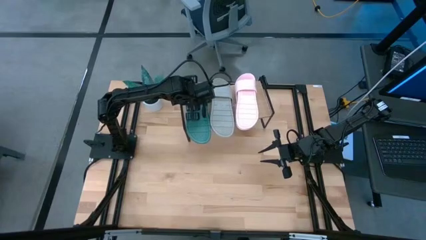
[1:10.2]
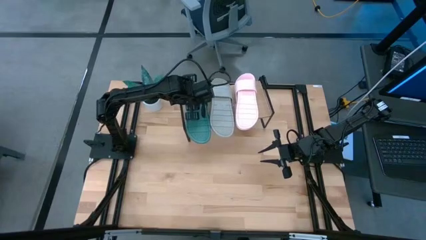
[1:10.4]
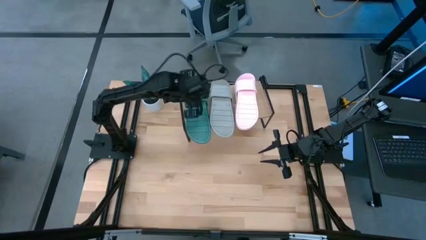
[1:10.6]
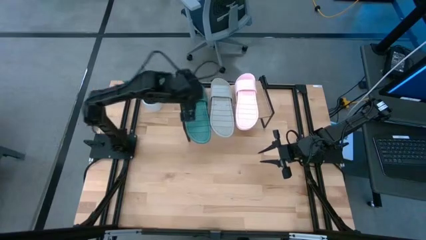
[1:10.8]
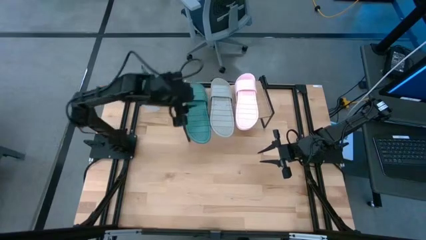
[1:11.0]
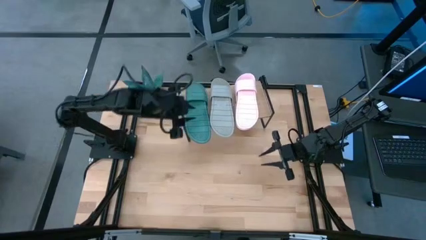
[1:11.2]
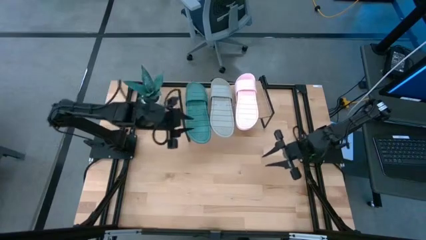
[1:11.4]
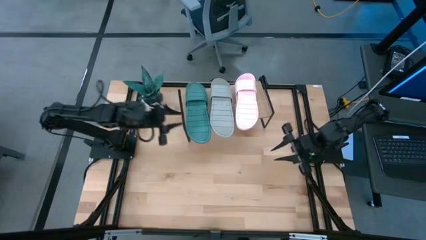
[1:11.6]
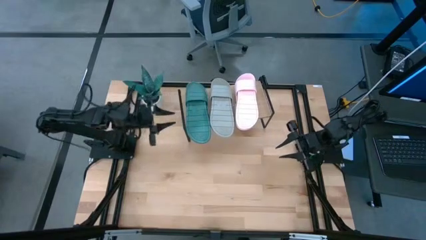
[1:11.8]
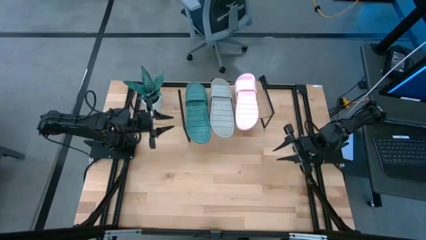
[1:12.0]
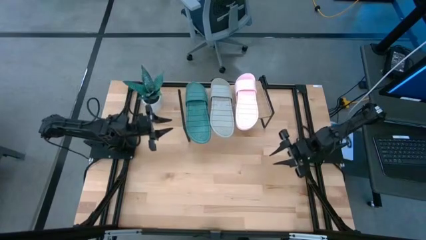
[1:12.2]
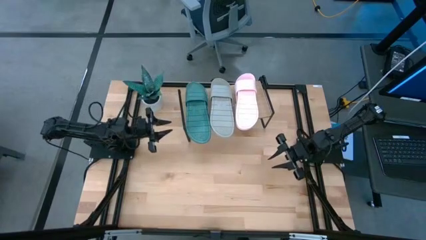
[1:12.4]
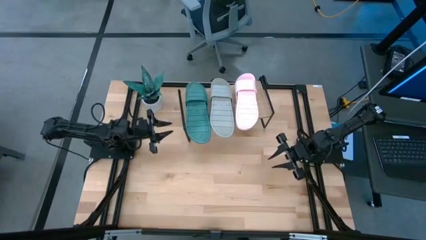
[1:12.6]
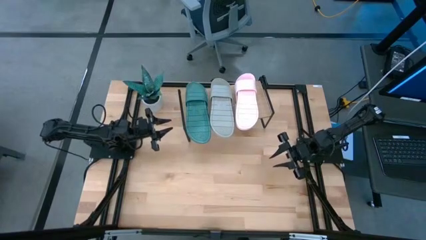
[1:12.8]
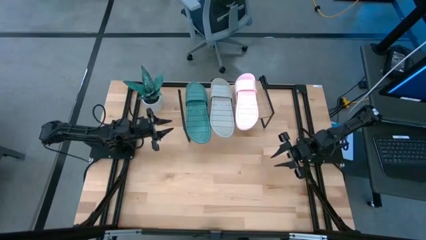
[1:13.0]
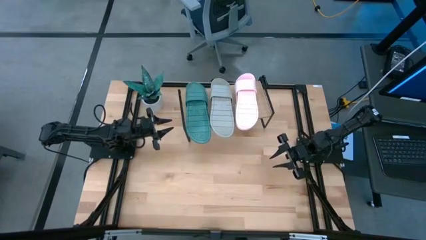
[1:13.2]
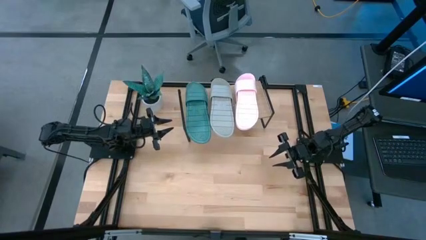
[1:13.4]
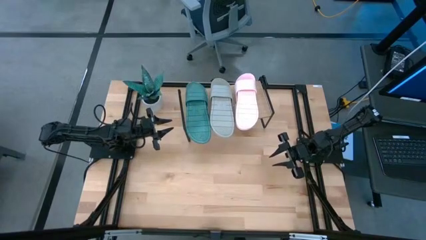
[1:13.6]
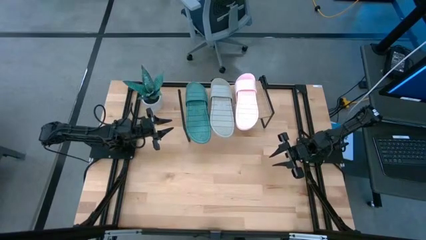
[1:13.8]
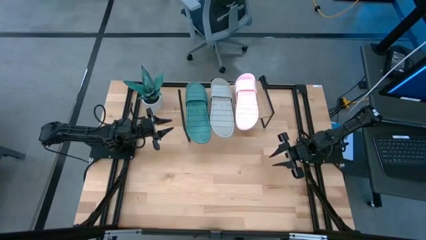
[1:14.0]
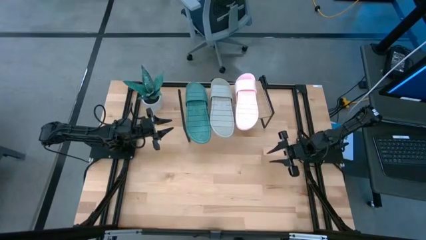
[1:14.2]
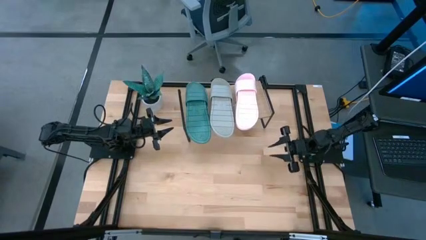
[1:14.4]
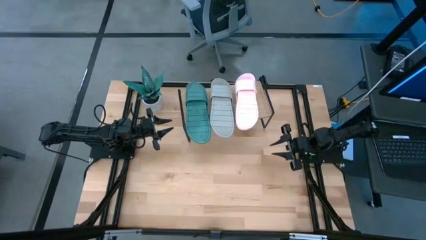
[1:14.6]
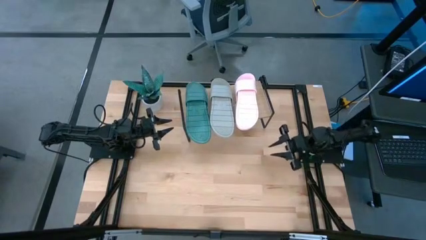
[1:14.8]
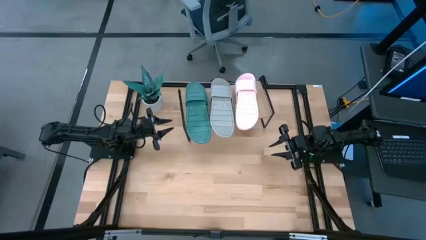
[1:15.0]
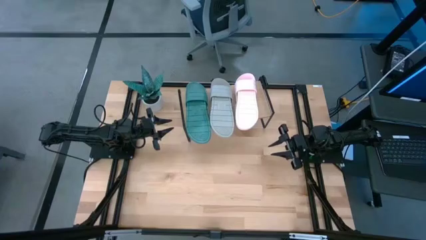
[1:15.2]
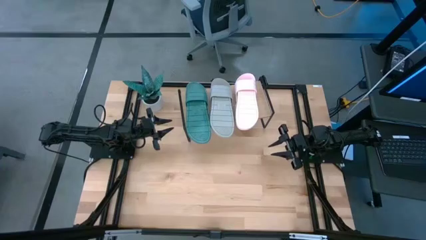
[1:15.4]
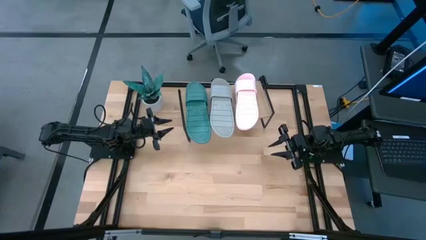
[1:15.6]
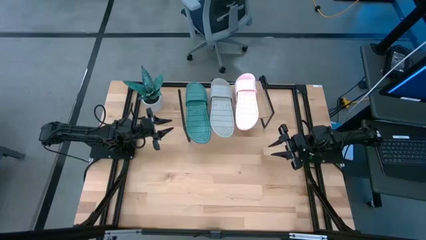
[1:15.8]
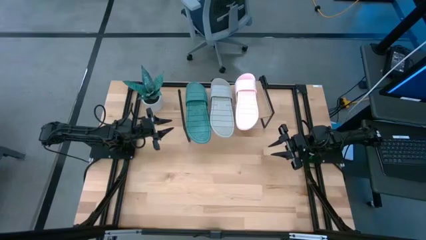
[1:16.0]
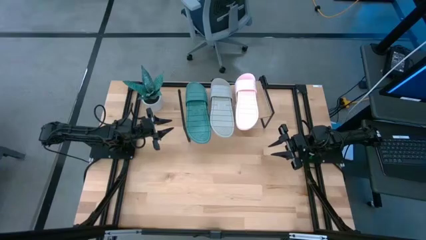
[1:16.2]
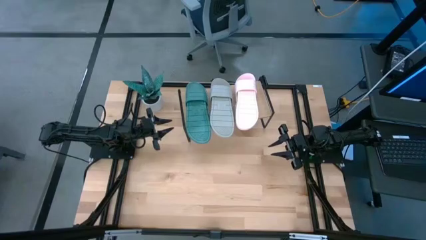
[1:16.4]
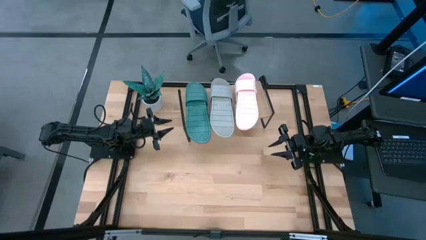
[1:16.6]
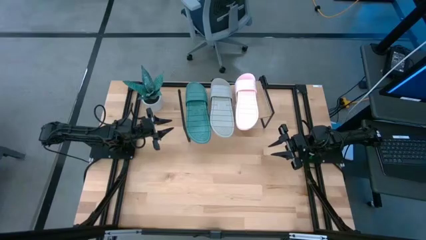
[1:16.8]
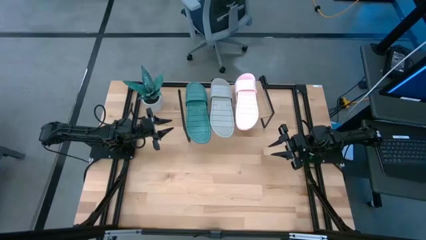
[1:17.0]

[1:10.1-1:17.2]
Task: Pick and place slides into the shelf
Return to Home Position
